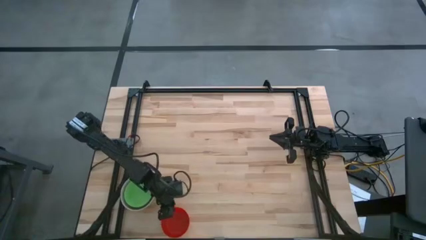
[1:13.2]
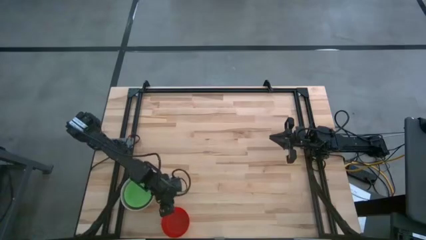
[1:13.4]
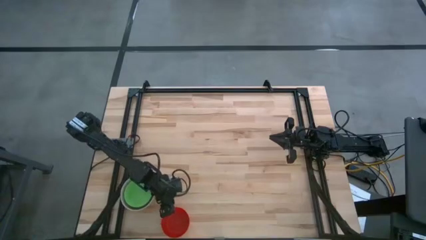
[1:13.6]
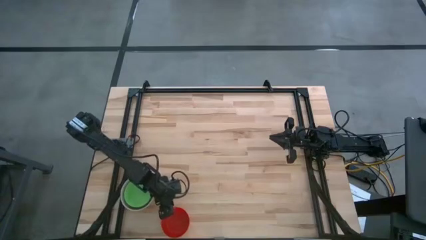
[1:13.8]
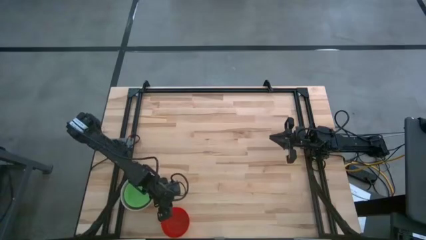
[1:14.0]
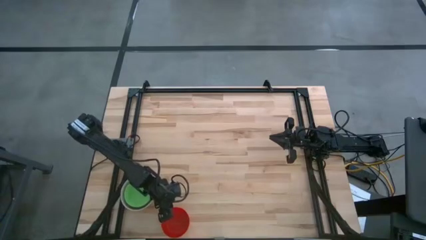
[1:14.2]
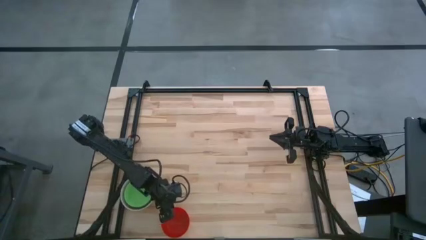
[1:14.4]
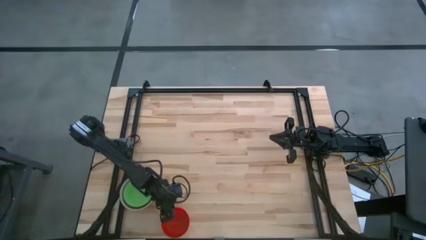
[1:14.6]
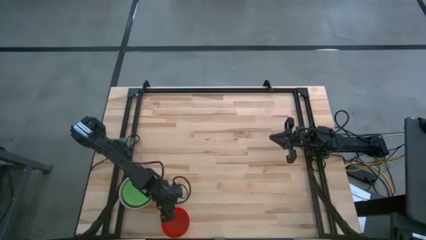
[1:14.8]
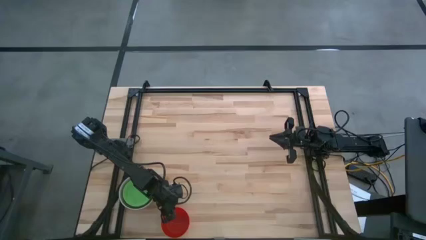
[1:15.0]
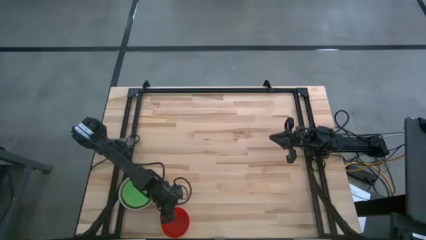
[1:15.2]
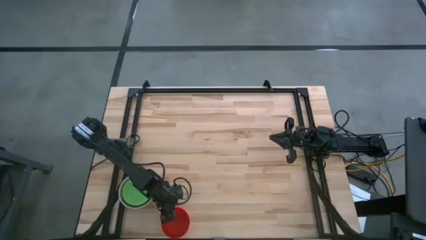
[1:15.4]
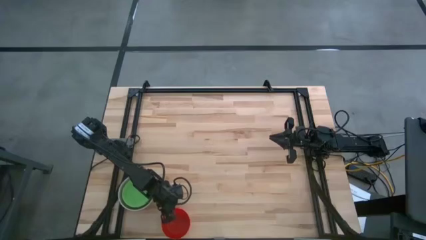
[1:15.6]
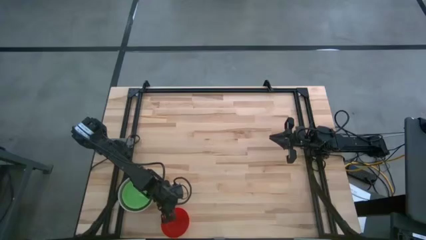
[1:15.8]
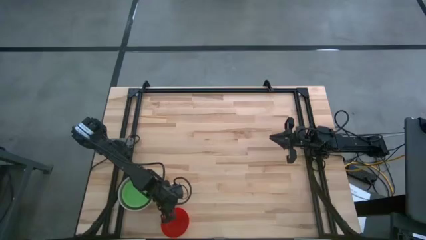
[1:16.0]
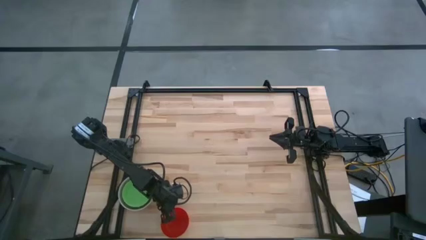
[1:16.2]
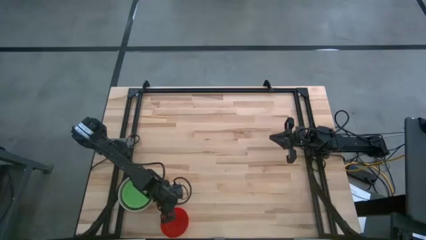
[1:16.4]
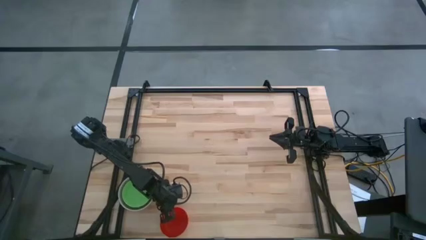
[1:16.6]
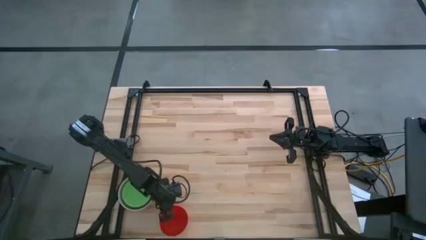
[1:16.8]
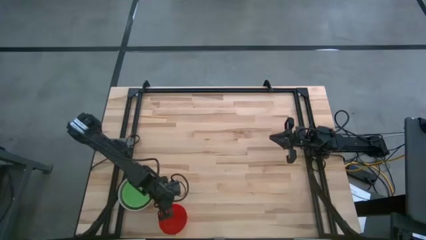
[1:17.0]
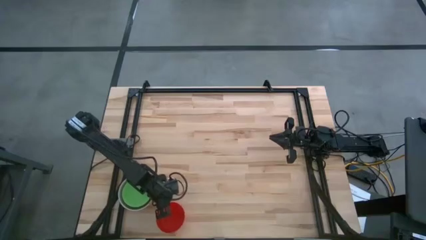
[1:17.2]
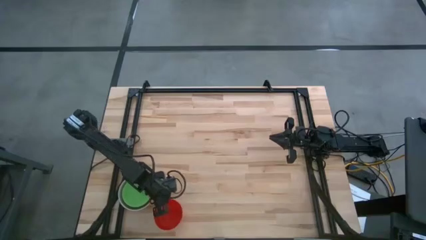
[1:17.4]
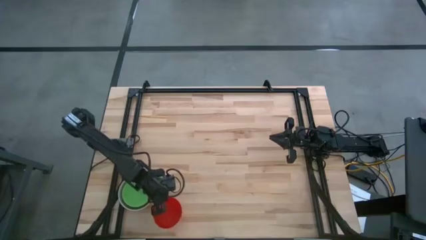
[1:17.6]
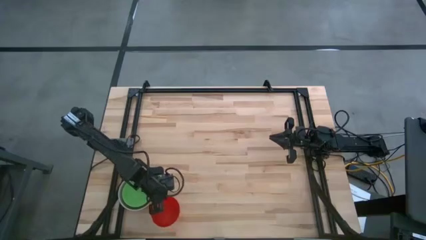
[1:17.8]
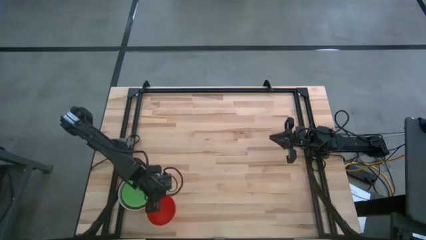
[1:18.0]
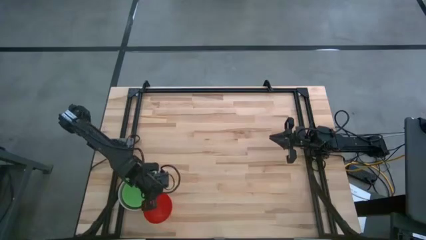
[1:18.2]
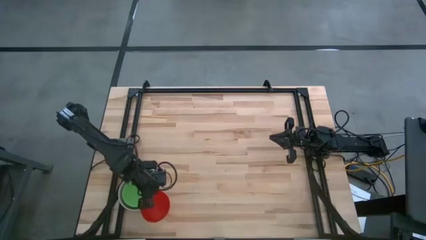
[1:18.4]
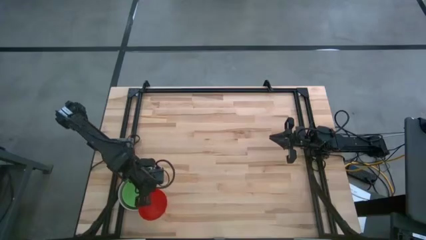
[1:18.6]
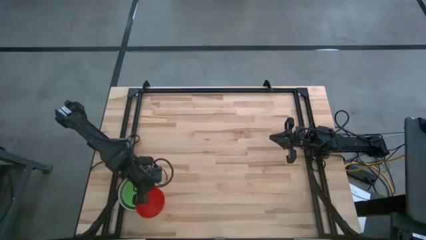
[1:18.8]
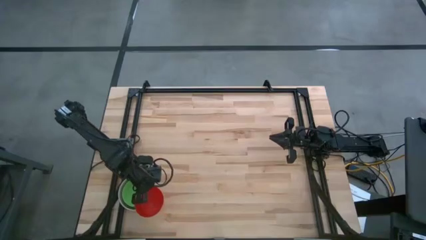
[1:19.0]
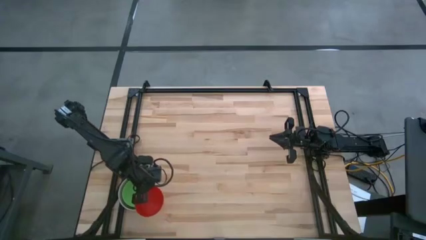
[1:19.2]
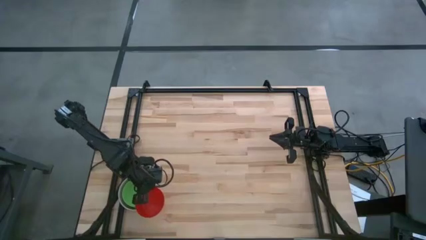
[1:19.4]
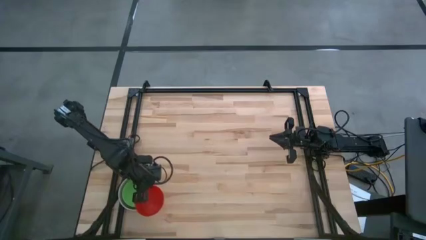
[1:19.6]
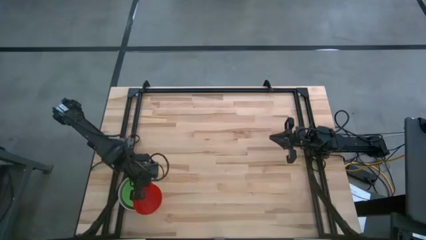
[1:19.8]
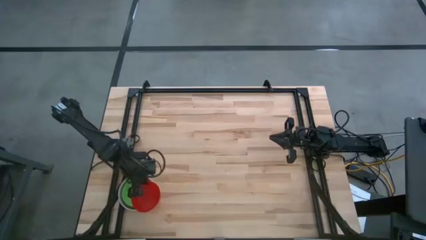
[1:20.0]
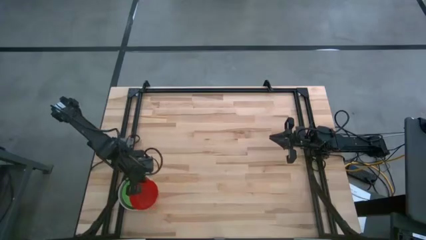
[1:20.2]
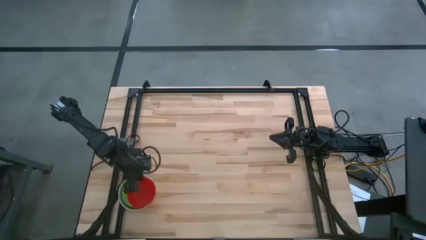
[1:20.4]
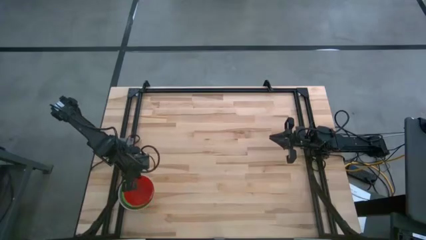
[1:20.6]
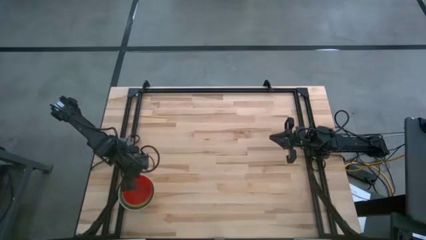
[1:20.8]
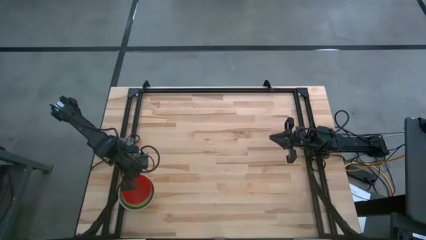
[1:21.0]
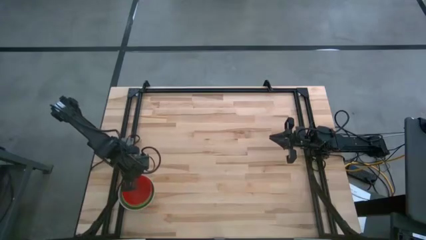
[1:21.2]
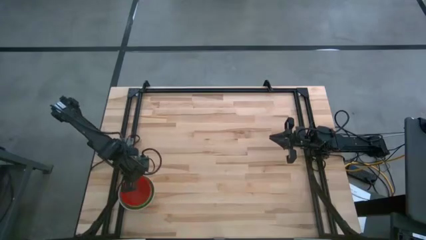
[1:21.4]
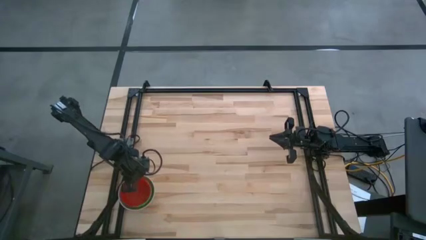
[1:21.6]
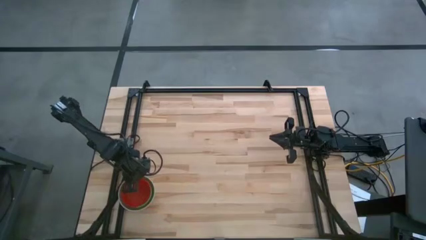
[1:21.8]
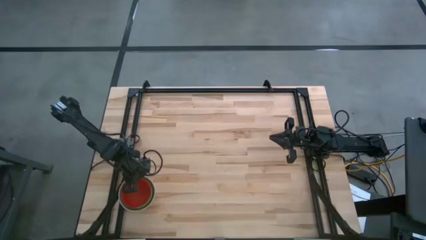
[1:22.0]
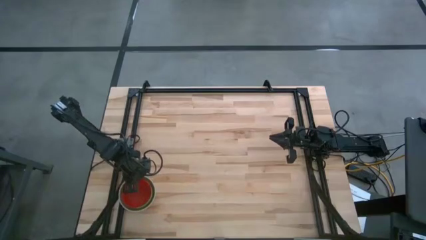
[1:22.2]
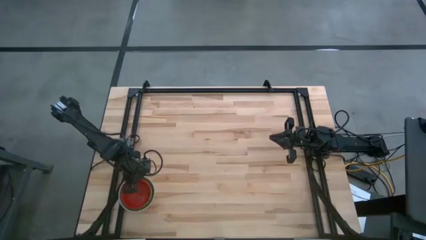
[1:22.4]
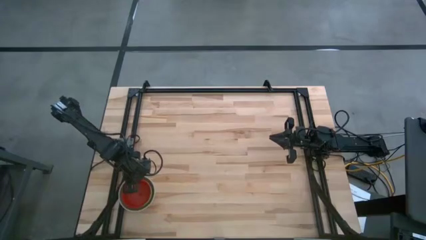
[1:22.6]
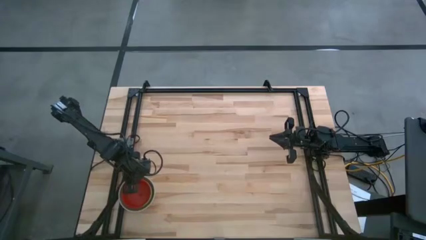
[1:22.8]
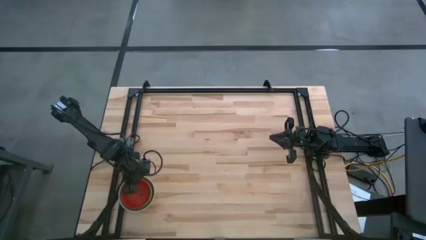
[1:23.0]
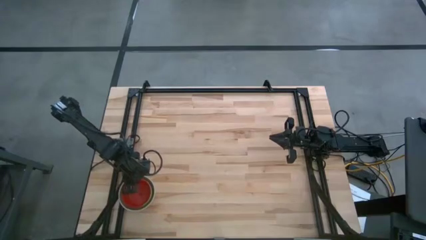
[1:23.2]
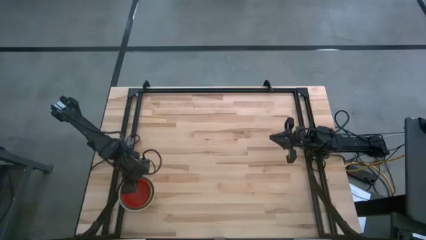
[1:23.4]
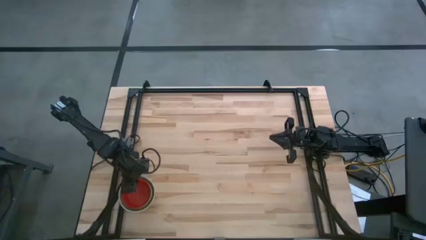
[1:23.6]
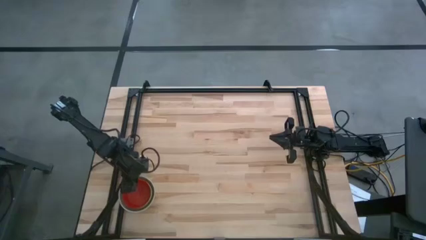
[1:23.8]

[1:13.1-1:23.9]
Stack the red bowl on the green bowl
